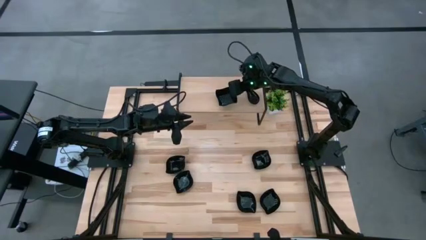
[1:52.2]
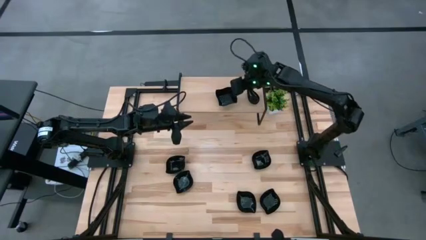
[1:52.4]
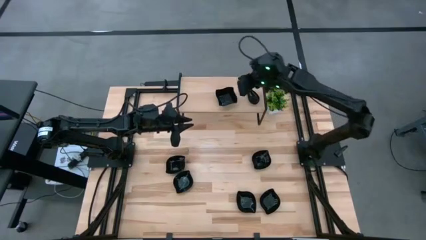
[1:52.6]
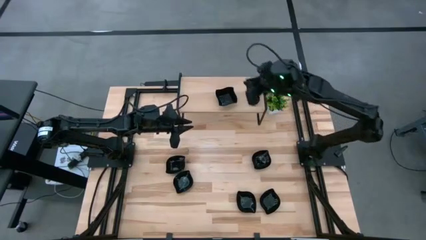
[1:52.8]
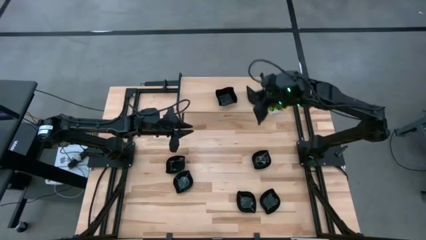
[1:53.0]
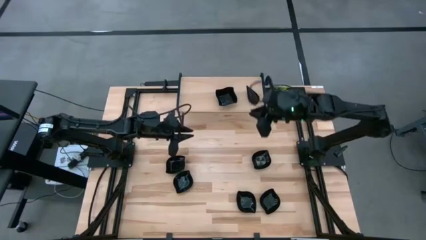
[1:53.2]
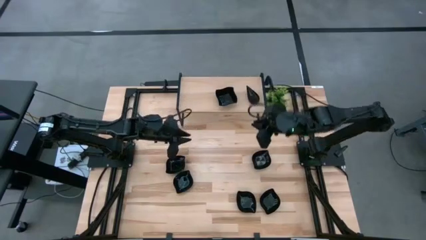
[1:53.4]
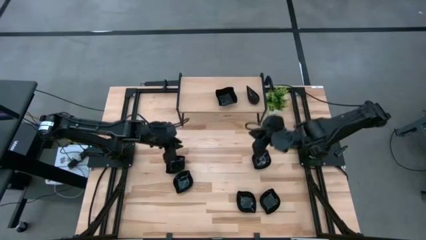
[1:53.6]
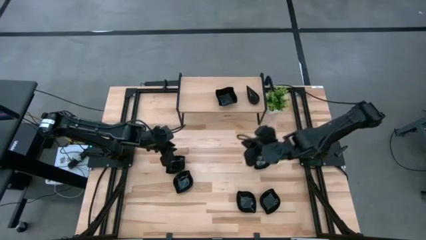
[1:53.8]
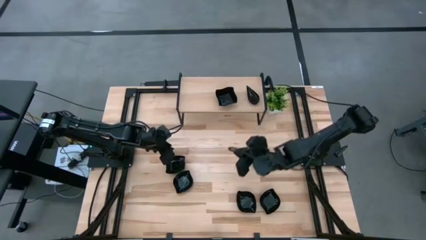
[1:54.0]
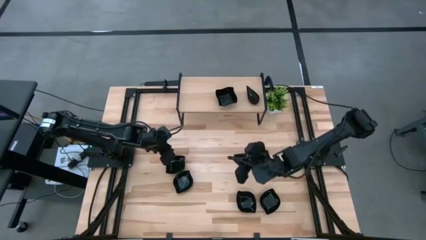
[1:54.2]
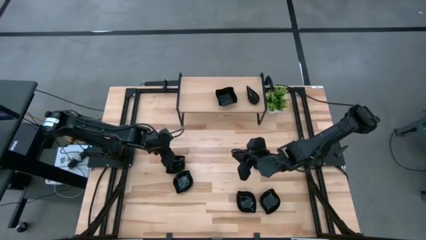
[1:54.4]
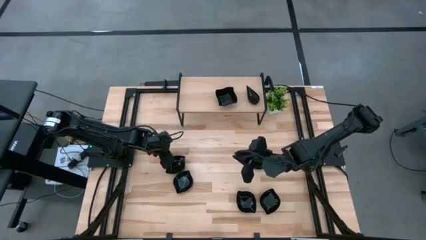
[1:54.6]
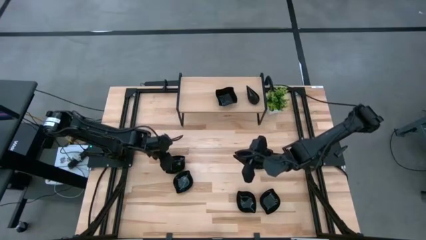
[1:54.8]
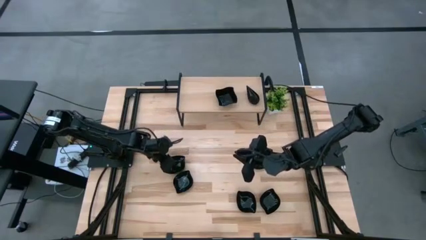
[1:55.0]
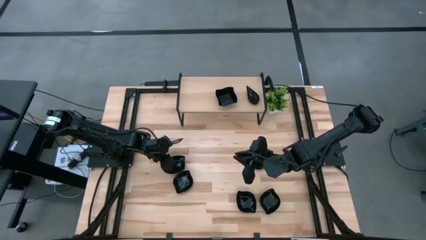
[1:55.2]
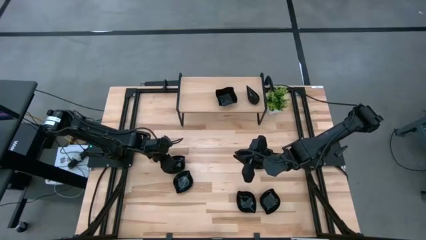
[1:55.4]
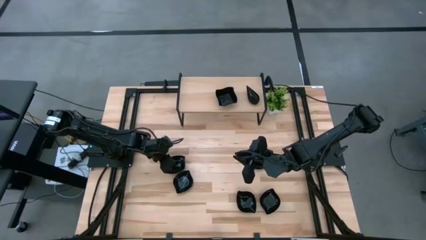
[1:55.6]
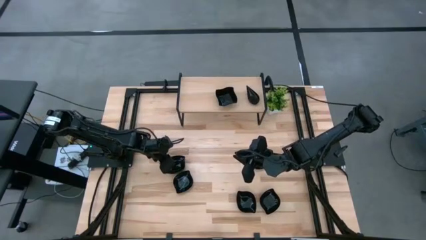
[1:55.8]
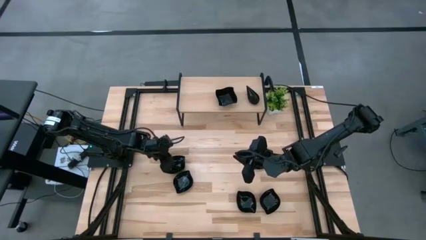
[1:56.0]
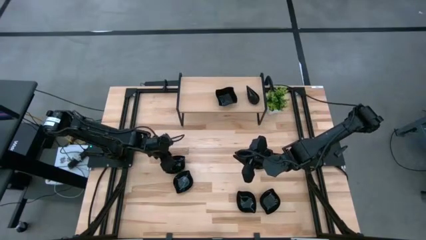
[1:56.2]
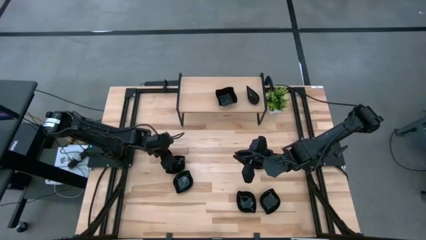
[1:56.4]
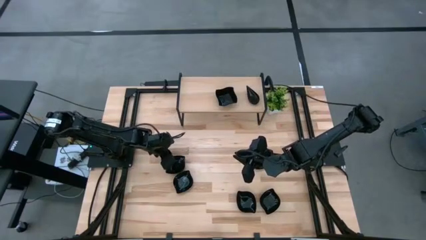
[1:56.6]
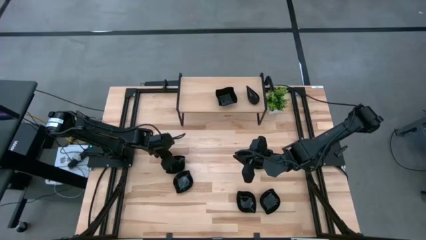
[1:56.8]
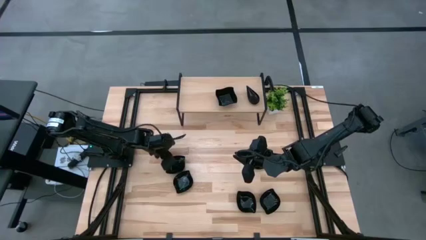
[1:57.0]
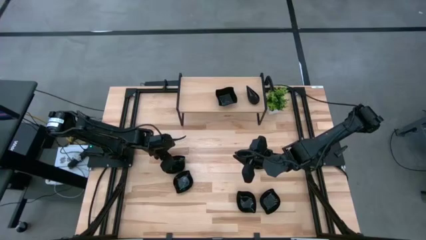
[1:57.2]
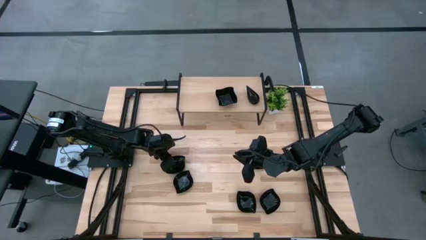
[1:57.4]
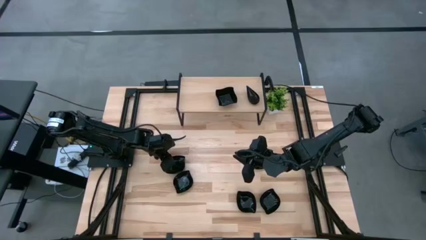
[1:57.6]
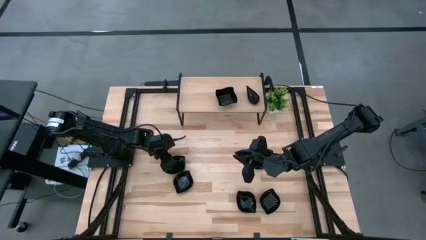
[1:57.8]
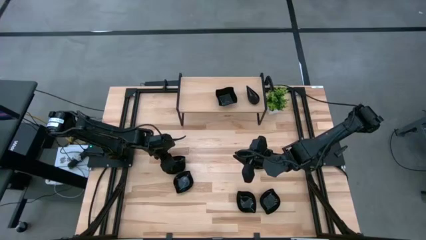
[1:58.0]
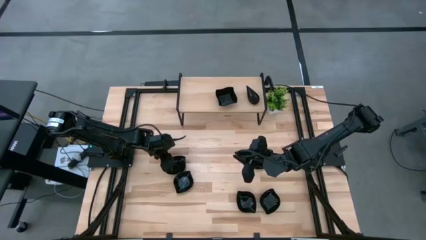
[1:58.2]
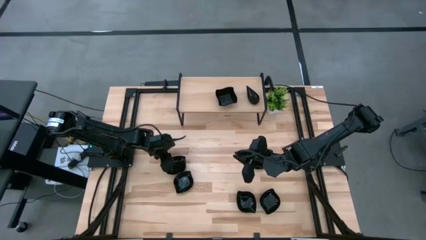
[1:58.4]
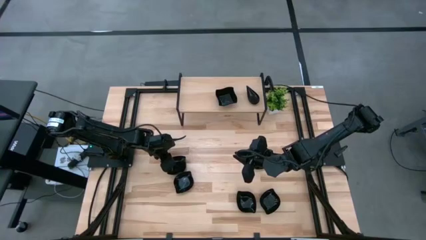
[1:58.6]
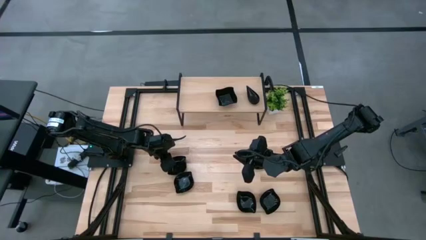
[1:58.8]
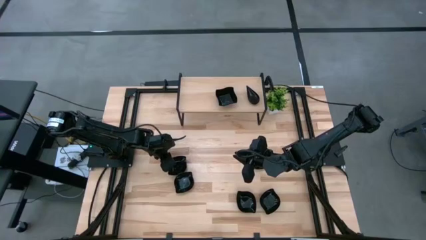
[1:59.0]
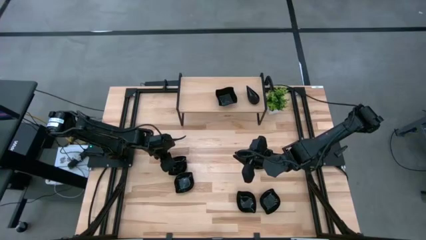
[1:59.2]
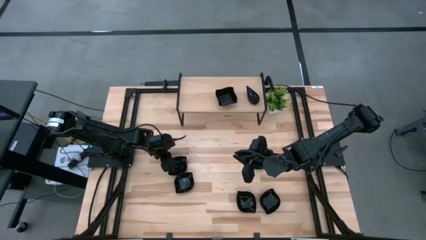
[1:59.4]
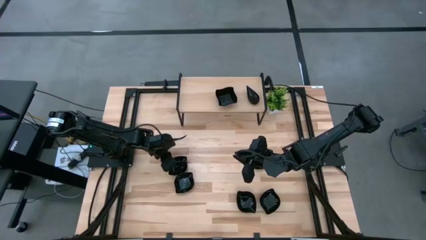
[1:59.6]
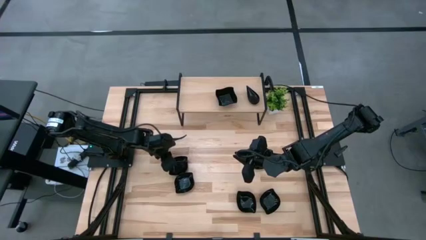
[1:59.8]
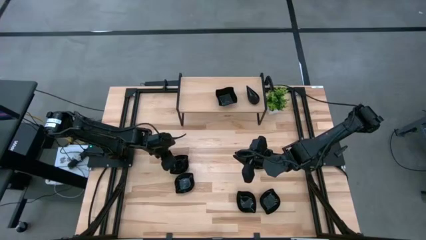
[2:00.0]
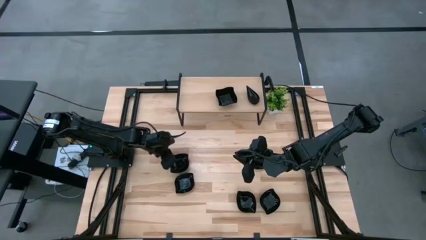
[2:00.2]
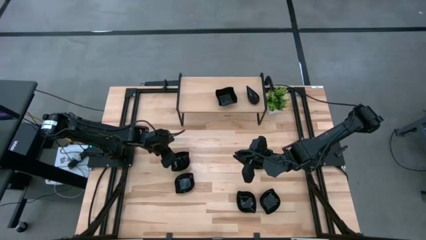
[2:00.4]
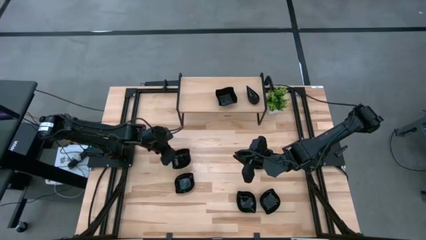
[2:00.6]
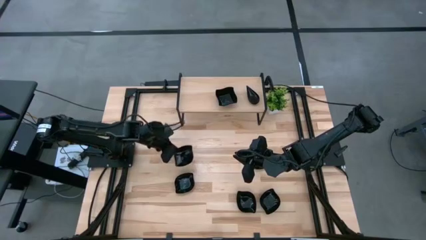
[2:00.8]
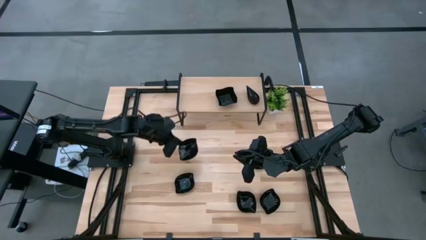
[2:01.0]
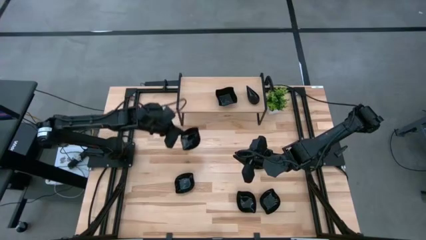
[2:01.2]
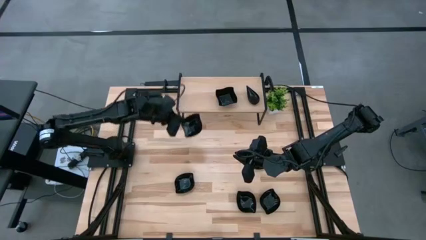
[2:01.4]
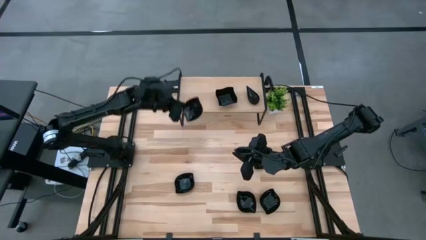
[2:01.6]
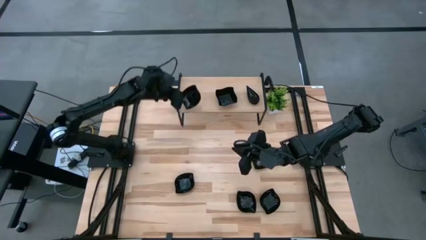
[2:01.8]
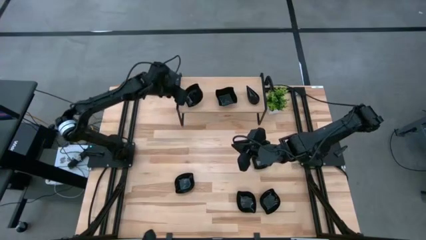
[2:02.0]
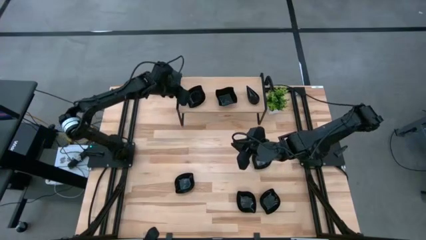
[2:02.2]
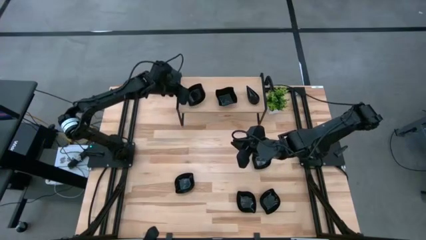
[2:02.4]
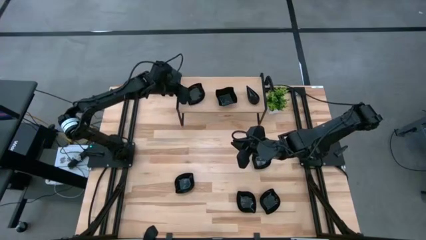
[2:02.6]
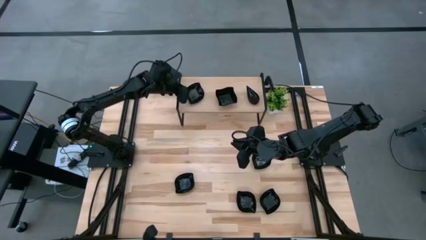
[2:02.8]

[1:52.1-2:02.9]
Task: Pick & Place Mini shaped plates
Put the black leaf shaped plate on the shelf
